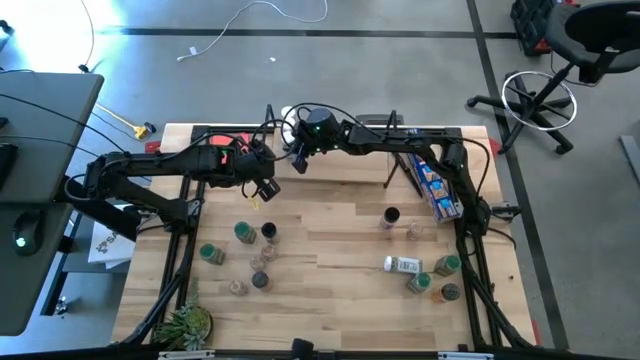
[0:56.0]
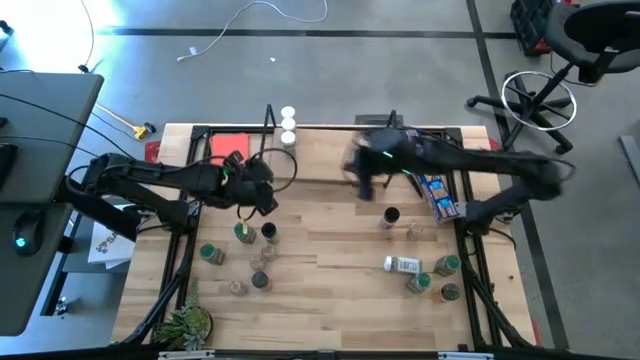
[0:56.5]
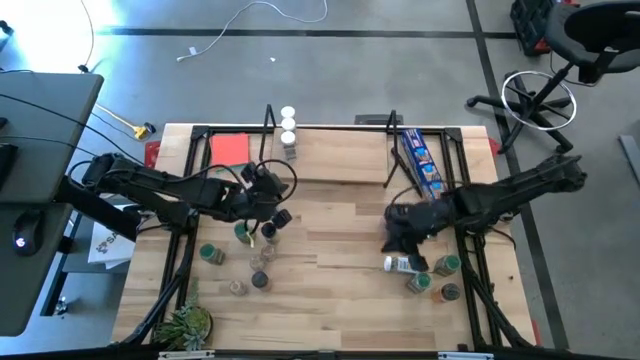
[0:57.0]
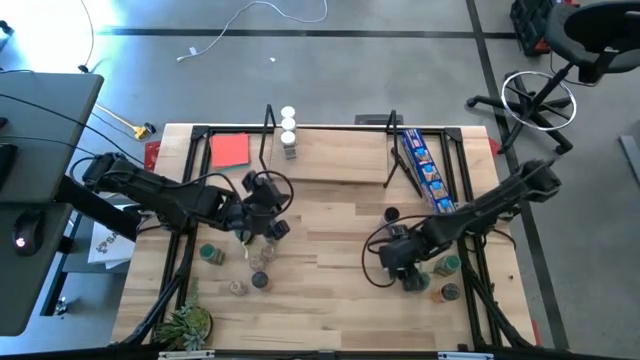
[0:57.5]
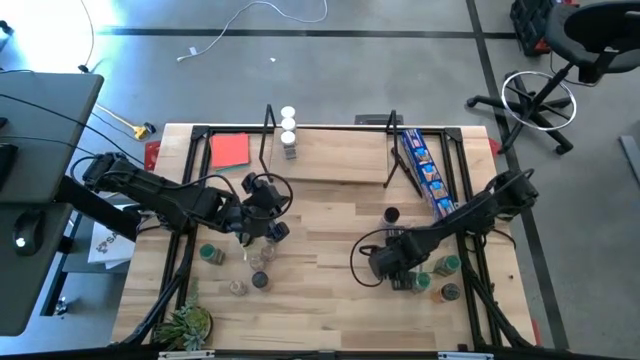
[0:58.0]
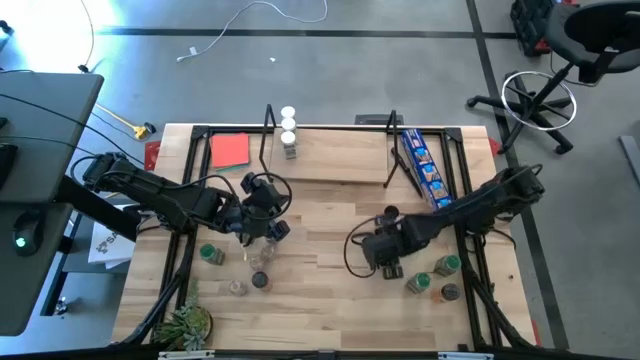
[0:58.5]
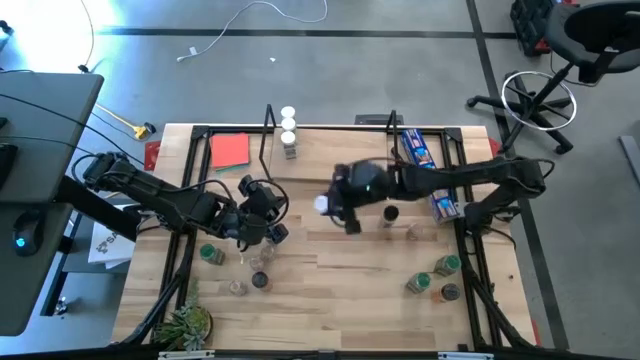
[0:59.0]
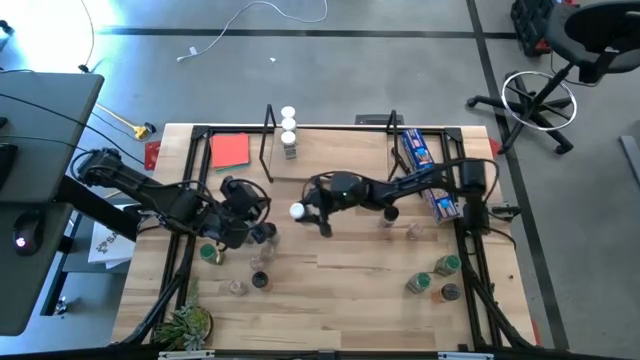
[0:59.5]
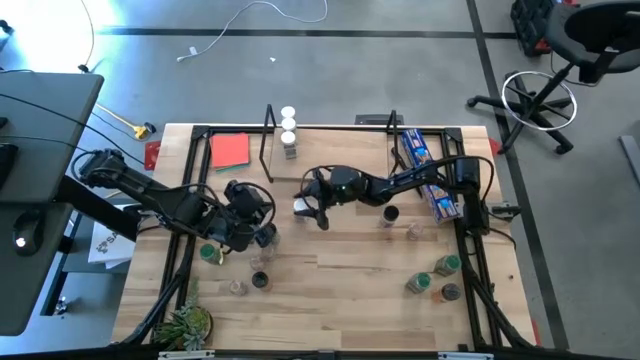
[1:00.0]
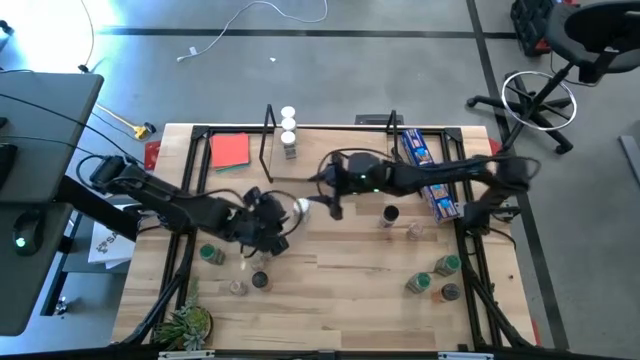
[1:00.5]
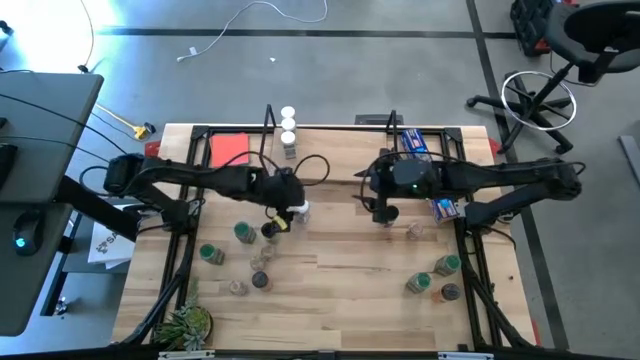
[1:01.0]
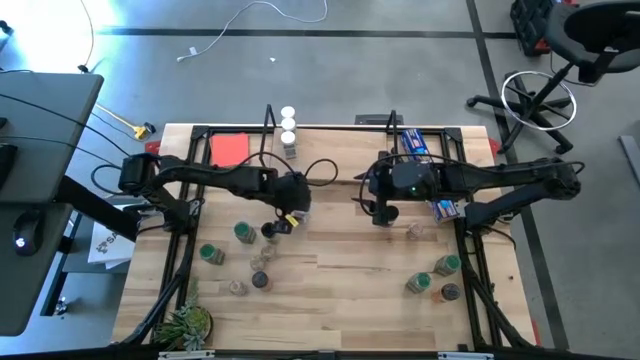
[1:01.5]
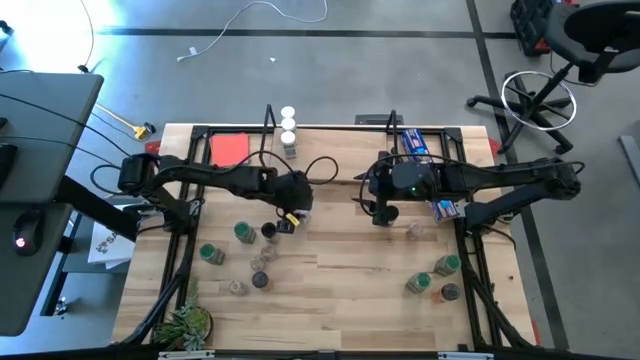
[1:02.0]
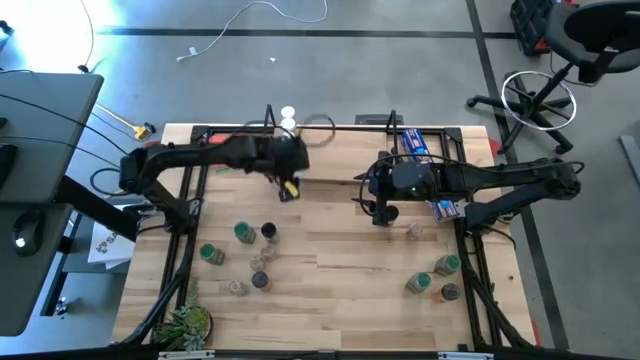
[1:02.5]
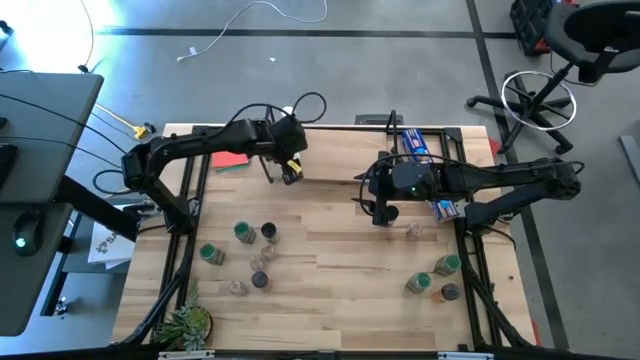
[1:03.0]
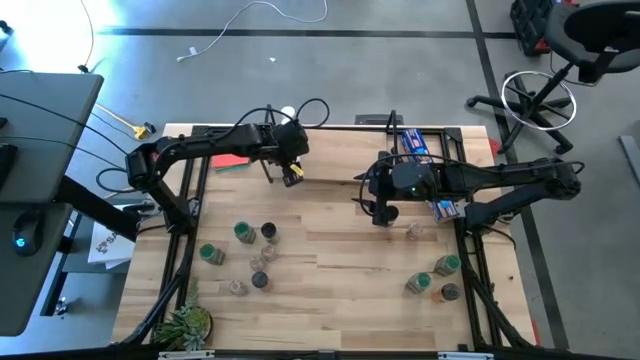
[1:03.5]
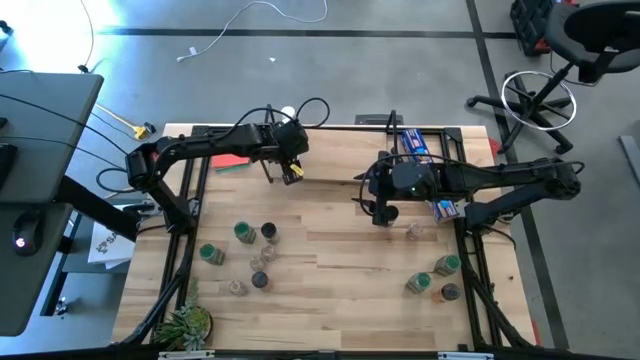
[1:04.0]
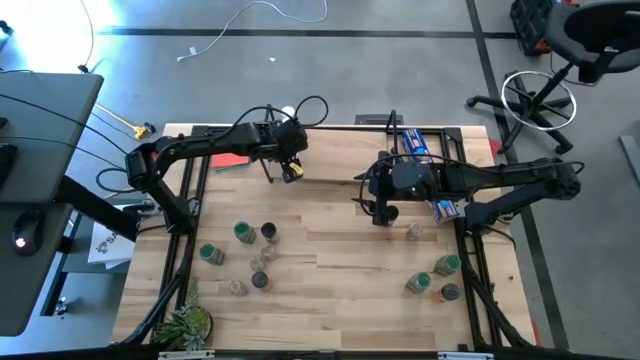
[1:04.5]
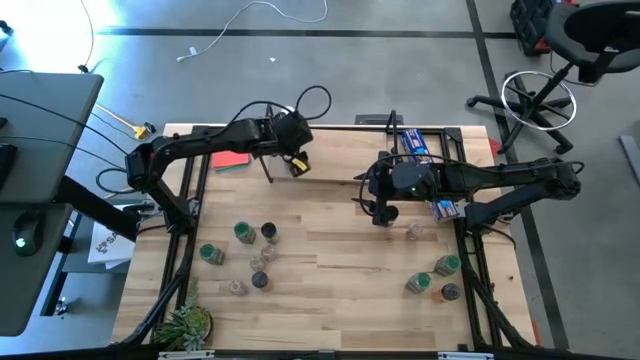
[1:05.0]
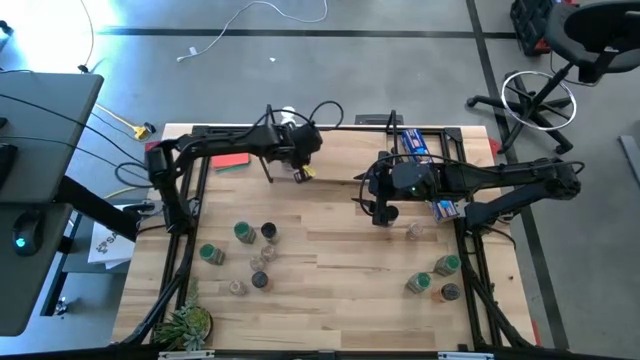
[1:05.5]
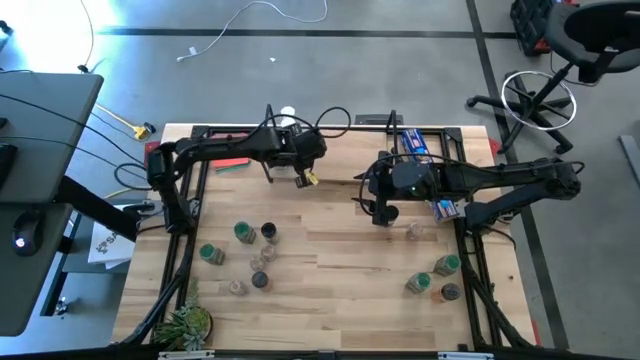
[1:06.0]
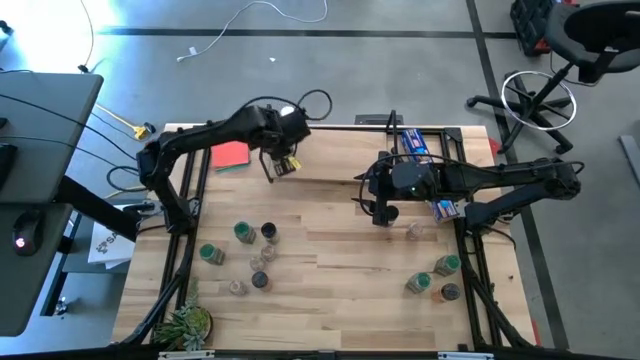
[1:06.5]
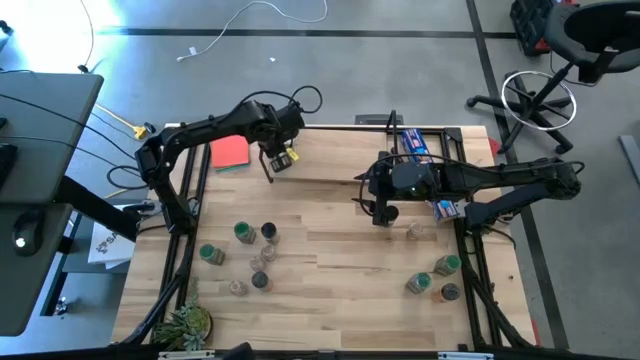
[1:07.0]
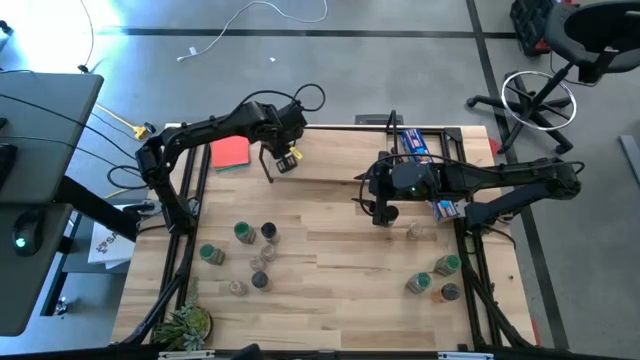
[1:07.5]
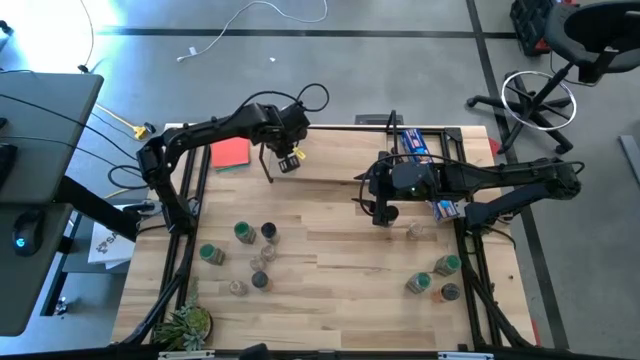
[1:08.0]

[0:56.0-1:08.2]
Task: Shelf spices
Put the white seasoning bottle on the shelf aligned with the other white seasoning bottles

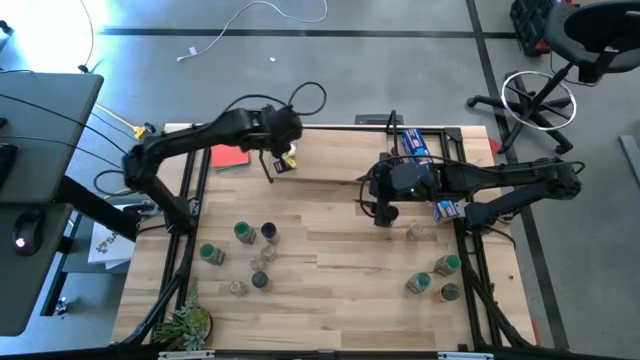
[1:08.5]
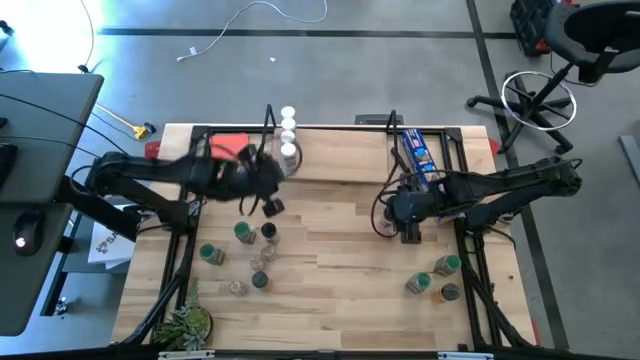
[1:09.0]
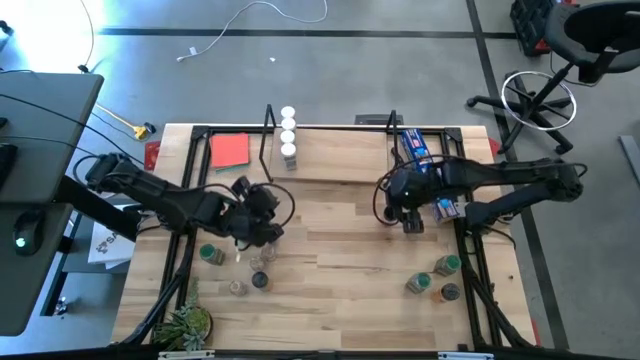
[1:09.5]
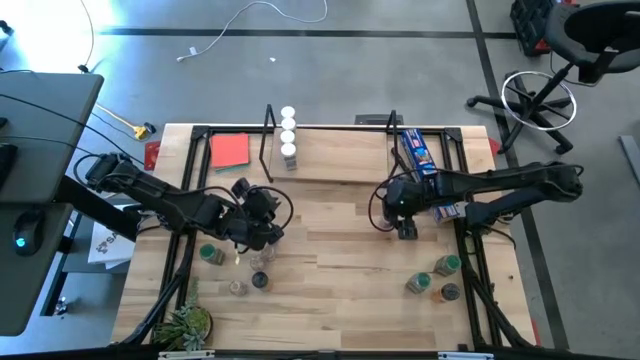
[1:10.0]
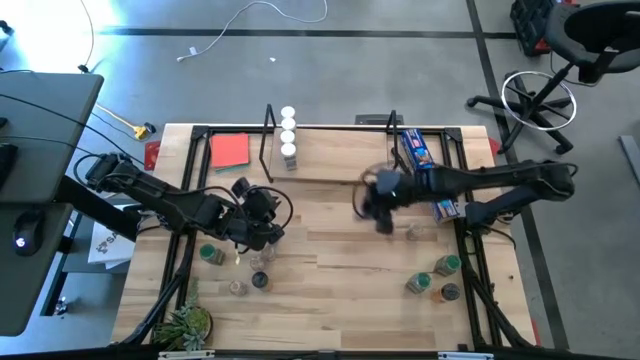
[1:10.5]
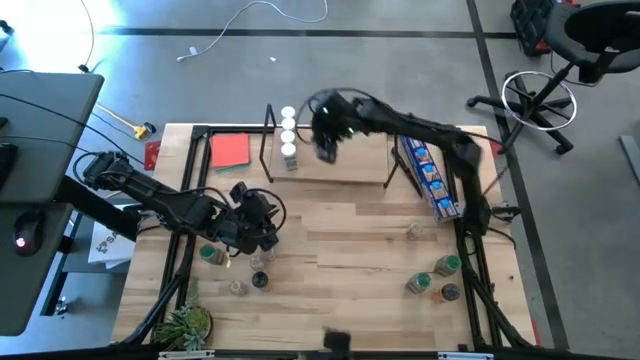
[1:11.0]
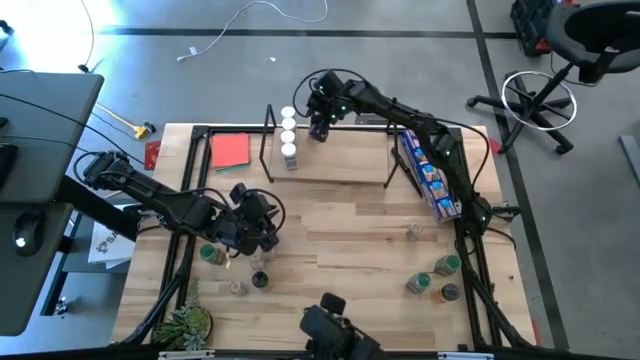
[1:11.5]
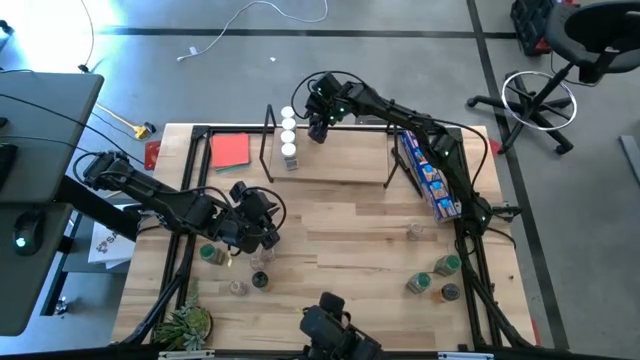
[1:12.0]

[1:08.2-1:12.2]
Put the black seasoning bottle on the shelf

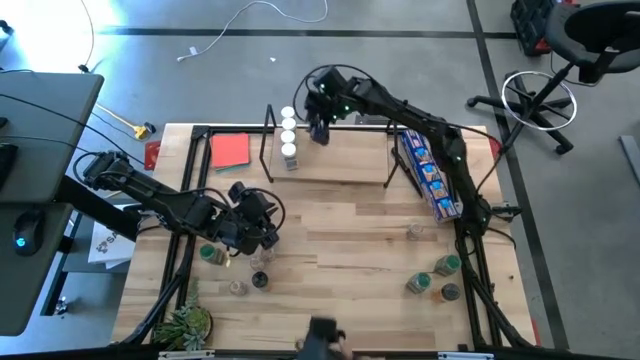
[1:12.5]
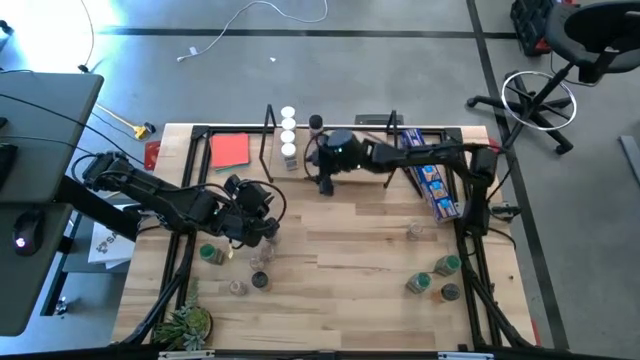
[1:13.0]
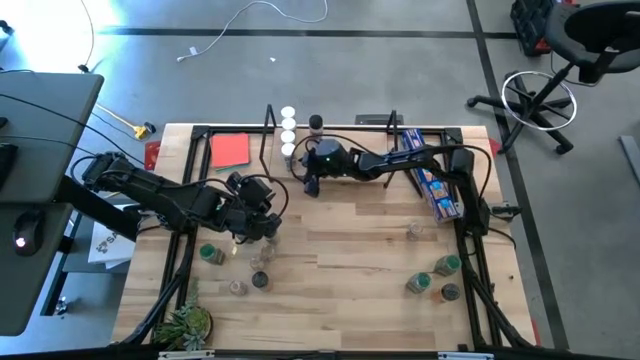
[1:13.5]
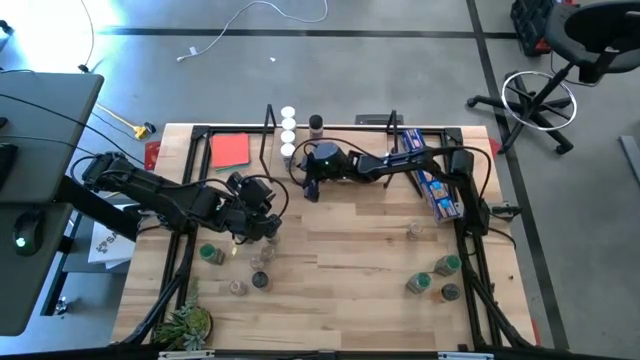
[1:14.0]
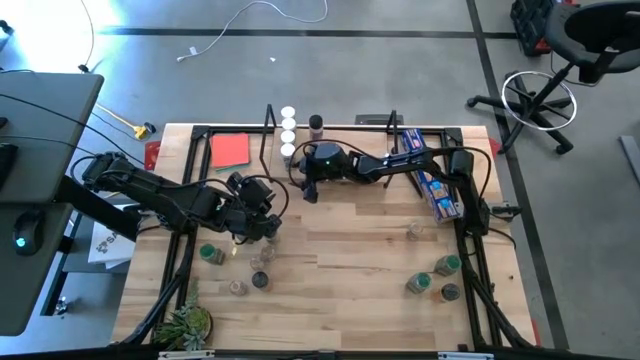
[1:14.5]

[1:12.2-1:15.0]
Adjust the white seasoning bottle on the shelf

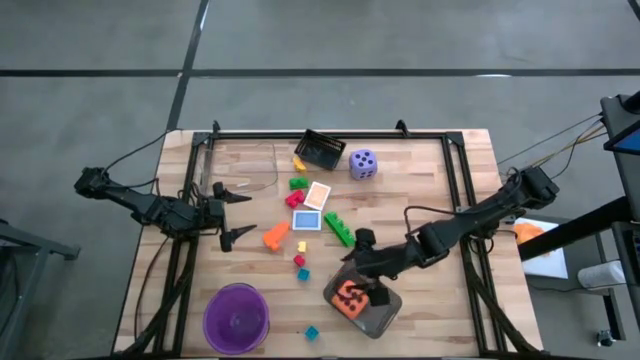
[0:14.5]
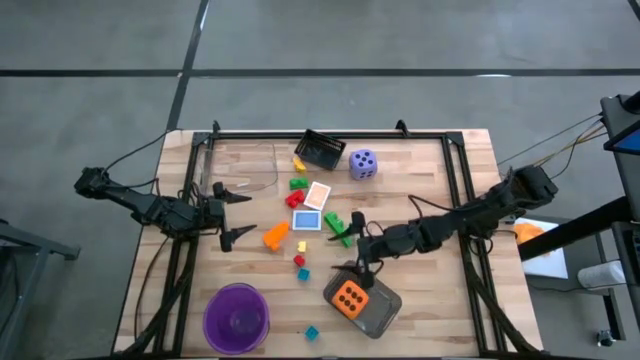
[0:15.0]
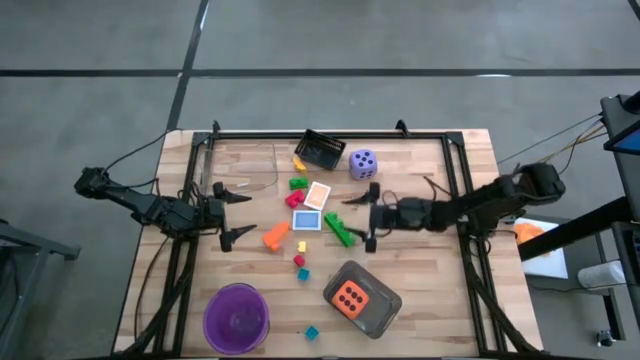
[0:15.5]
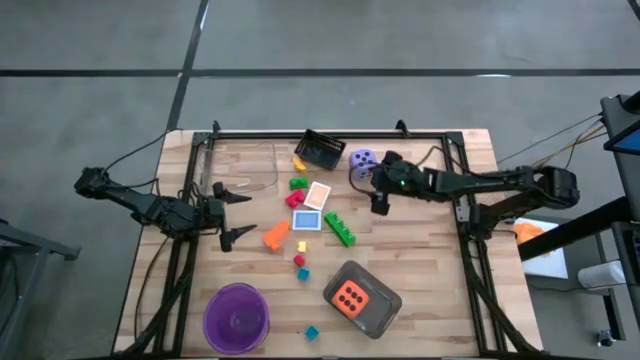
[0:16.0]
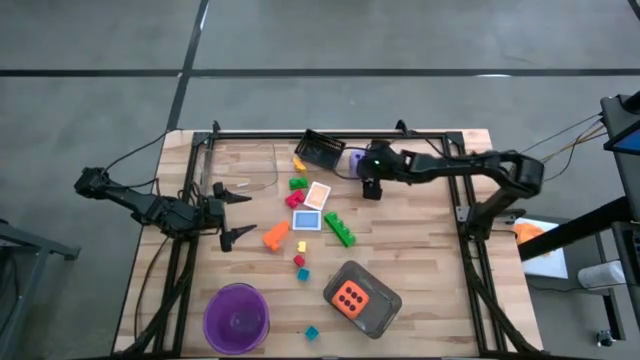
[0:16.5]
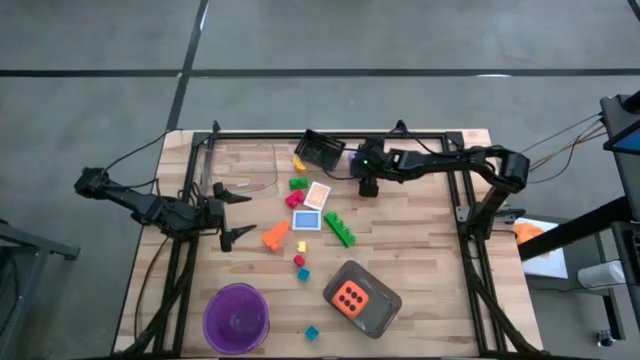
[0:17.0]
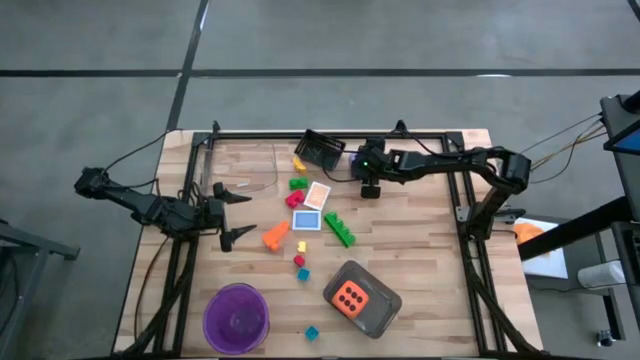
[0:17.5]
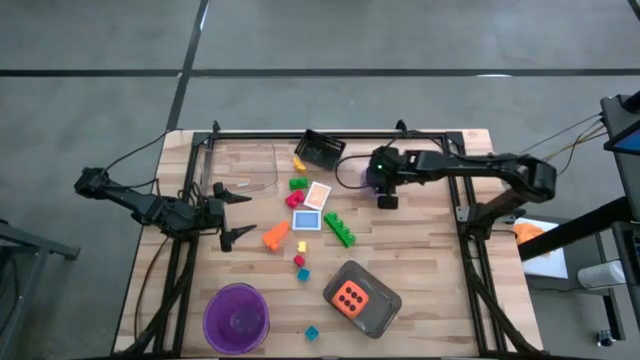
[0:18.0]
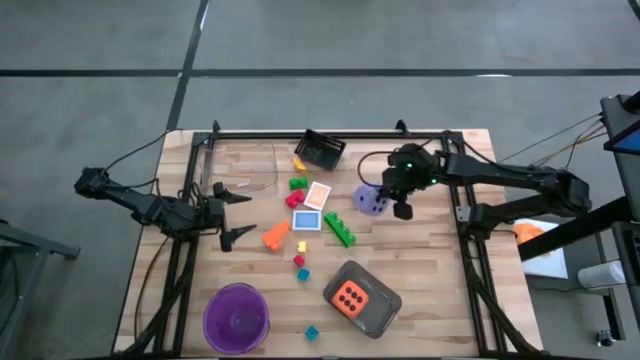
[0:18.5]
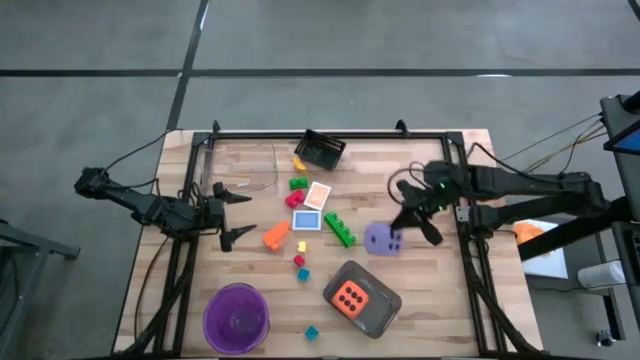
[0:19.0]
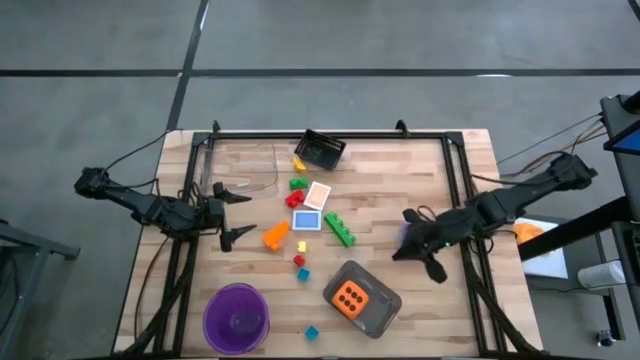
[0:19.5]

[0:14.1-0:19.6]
Task: Pick & Place Toys
Put the violet die into the gray bin
